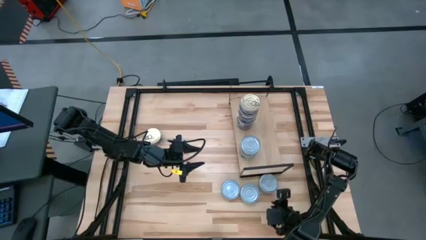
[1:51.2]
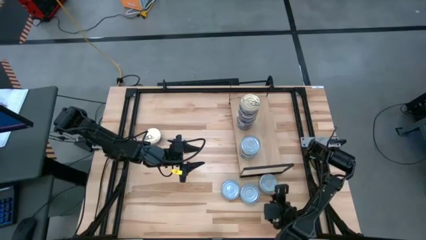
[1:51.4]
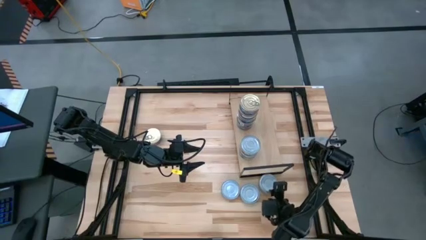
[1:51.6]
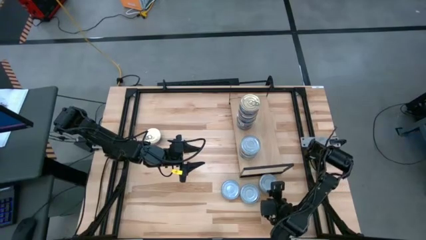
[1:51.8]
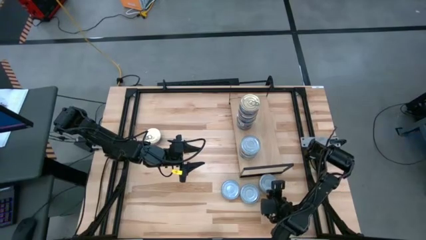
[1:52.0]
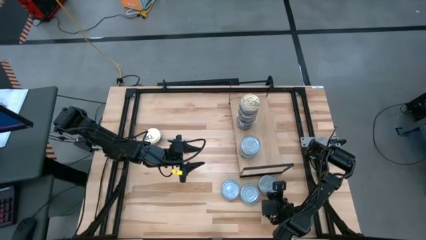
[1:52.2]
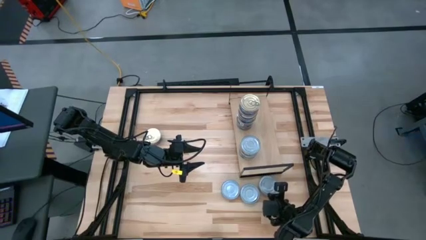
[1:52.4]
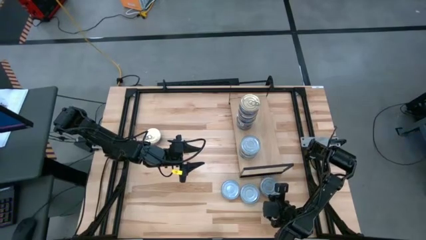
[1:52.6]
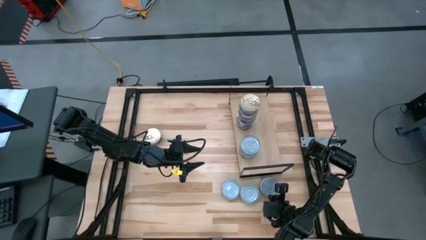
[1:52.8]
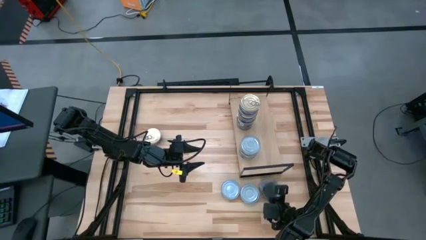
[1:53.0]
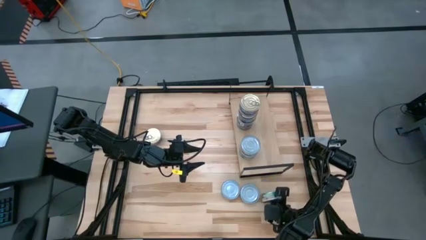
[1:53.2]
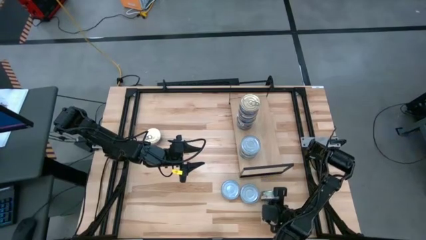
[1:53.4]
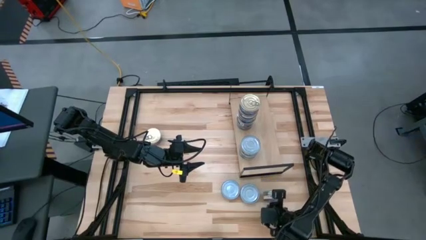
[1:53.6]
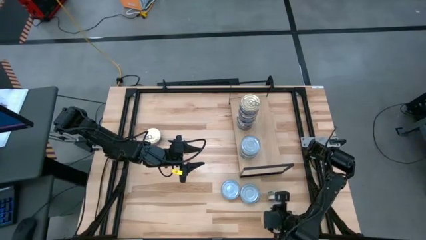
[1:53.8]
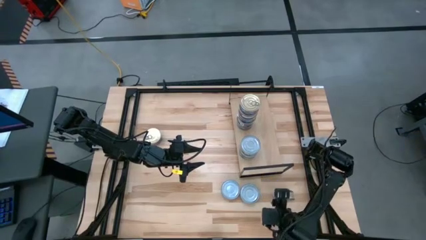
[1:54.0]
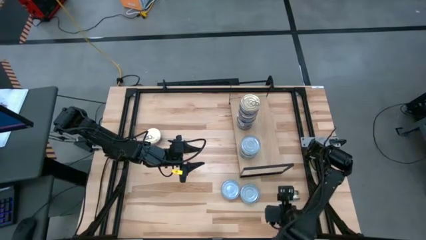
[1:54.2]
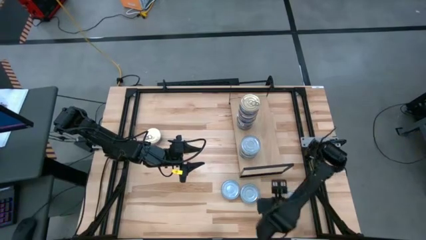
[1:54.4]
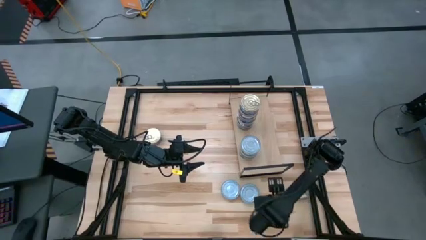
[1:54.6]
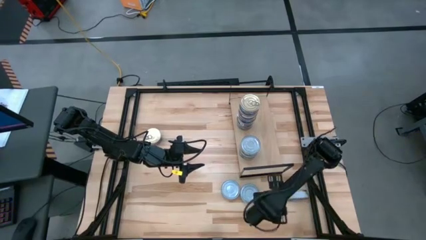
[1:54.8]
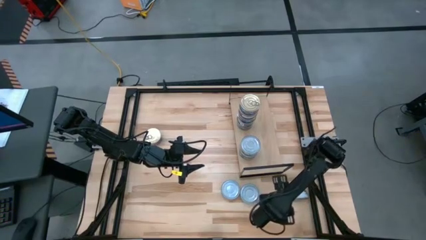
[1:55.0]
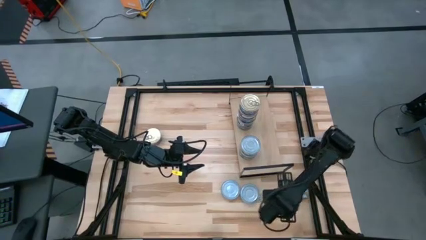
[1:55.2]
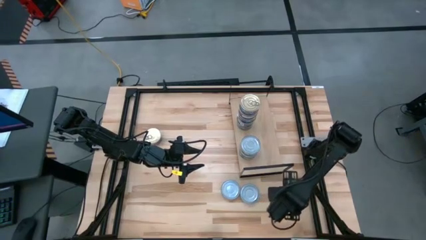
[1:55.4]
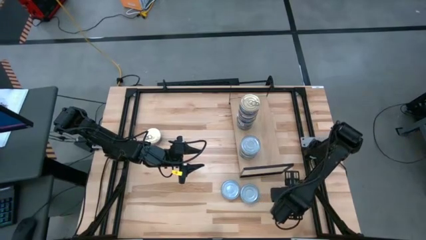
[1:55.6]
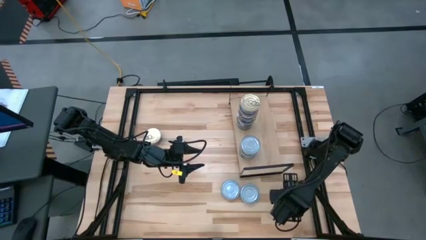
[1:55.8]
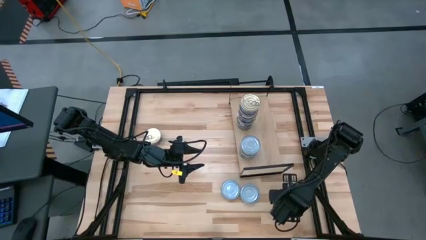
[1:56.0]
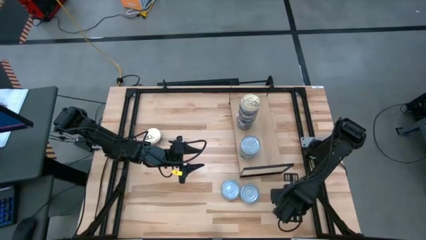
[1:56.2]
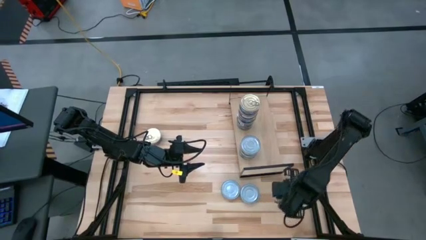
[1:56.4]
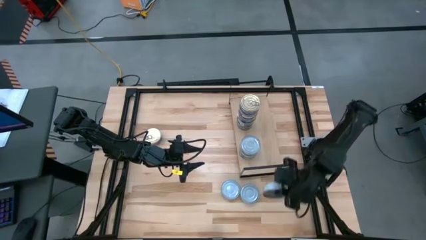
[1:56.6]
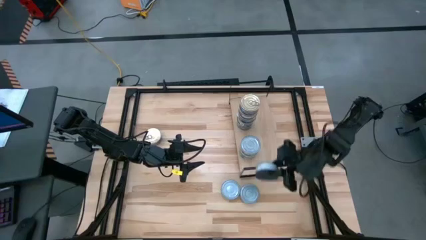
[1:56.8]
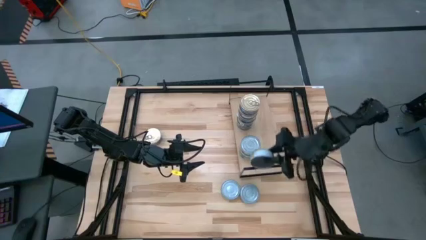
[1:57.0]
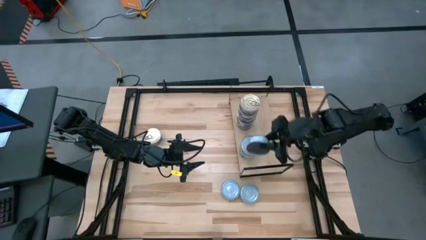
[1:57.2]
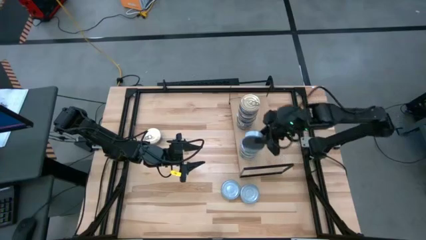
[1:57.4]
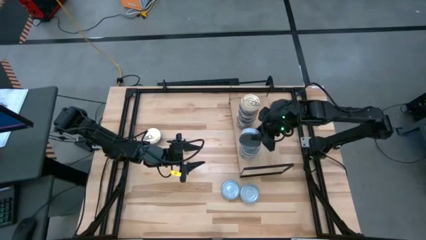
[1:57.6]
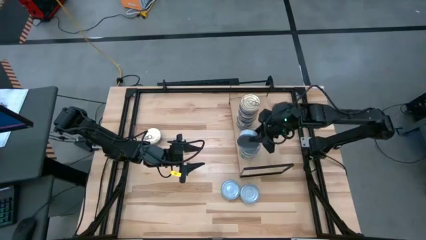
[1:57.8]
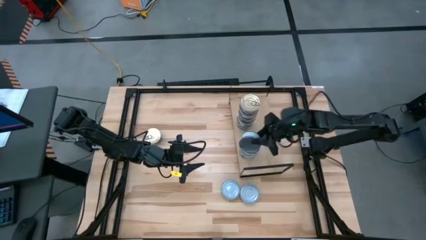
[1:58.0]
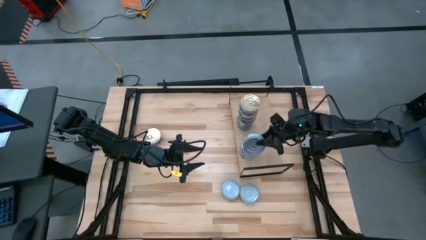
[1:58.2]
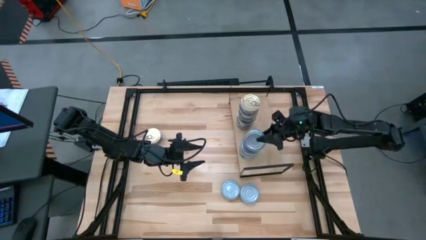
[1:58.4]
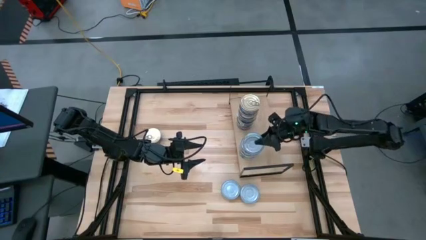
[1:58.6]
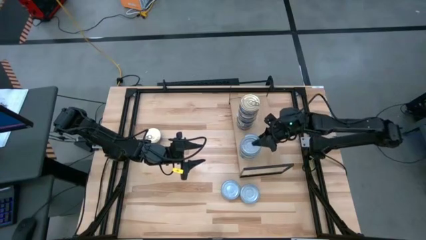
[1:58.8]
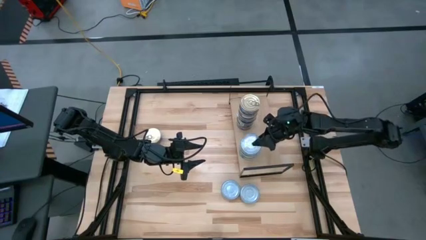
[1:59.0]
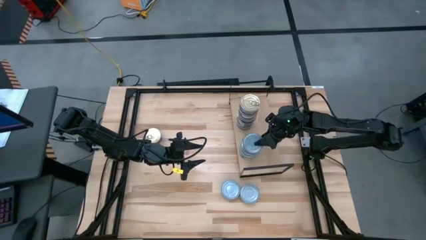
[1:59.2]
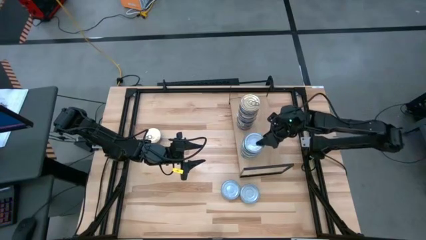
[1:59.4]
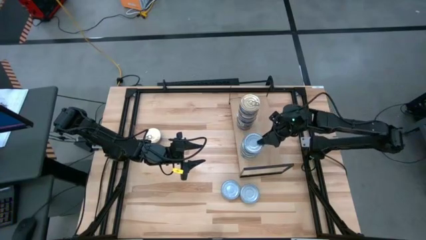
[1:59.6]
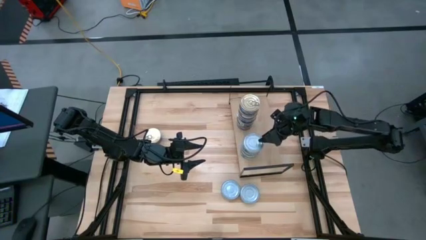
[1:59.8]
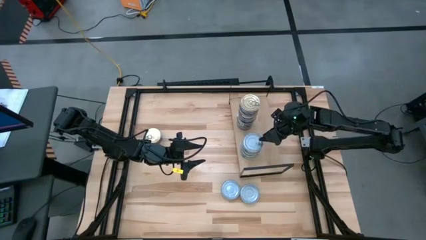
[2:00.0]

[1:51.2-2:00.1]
Task: Stack canned seafood by type on shelf
Stack the green tuna can on top of the other green tuna can on the shelf
